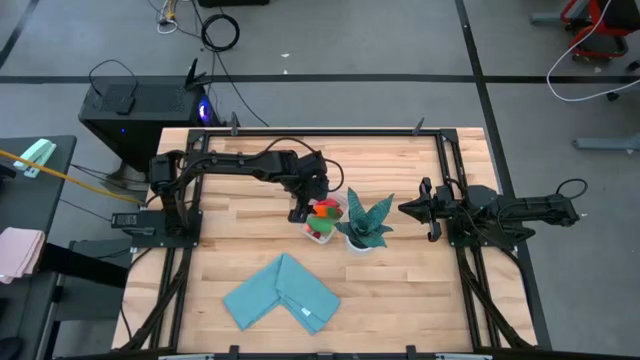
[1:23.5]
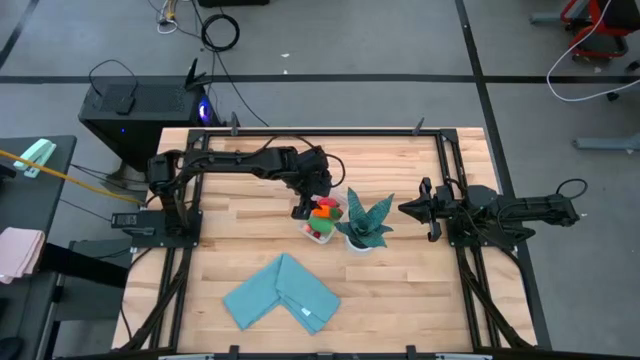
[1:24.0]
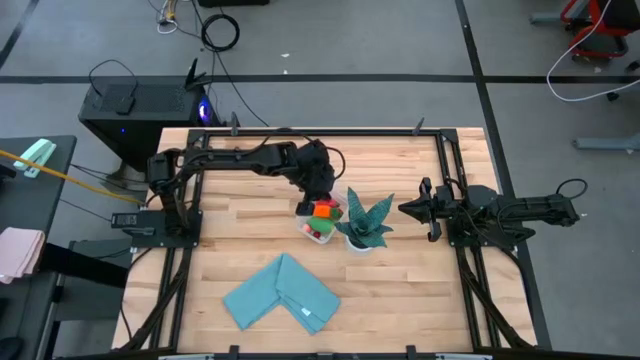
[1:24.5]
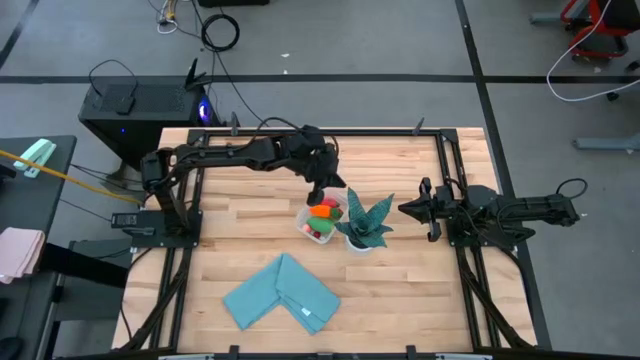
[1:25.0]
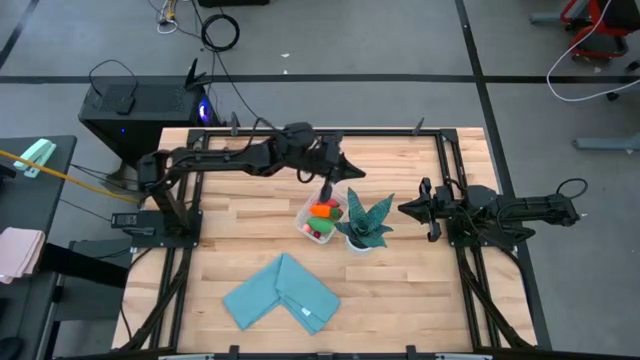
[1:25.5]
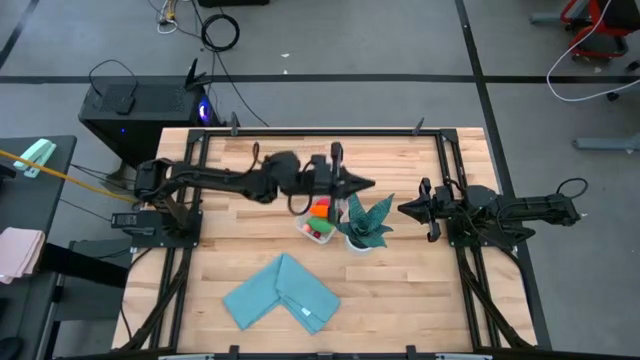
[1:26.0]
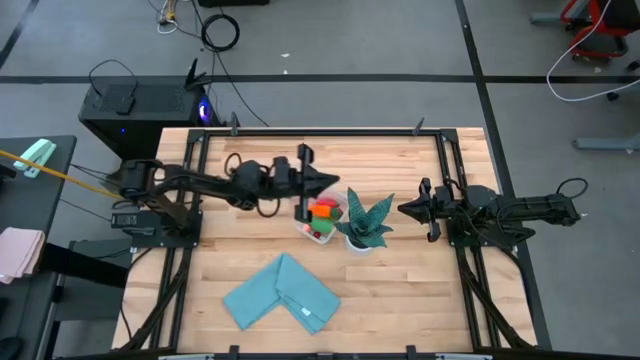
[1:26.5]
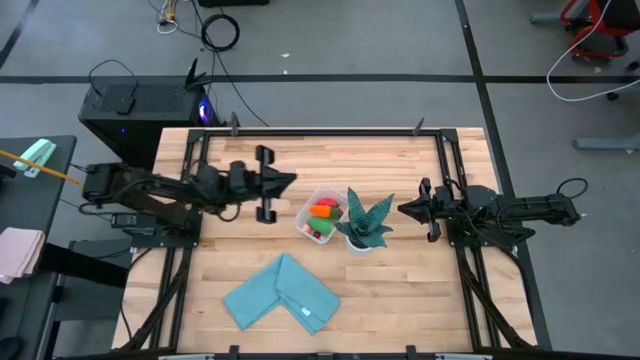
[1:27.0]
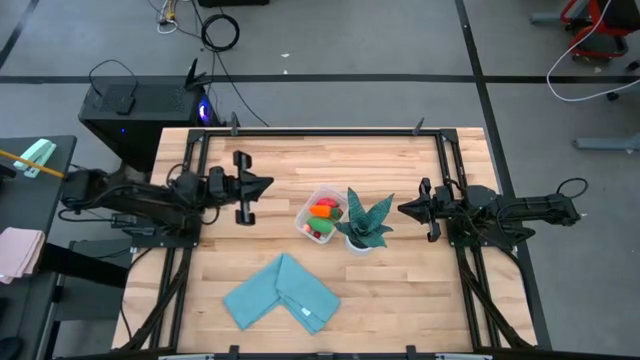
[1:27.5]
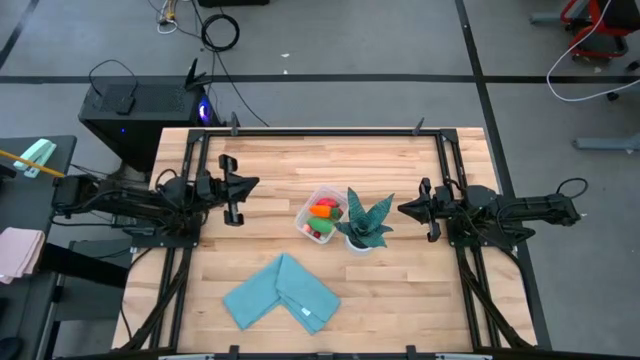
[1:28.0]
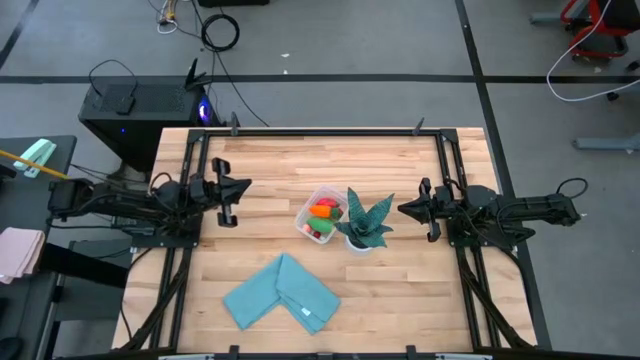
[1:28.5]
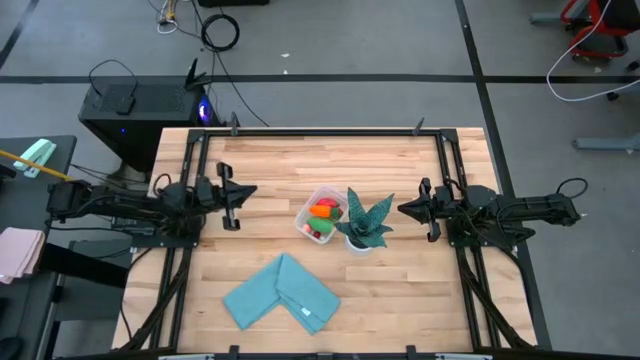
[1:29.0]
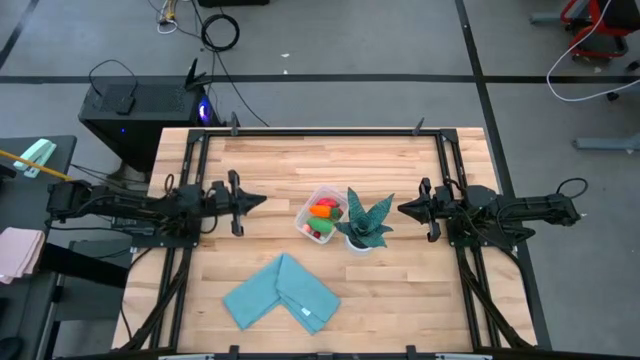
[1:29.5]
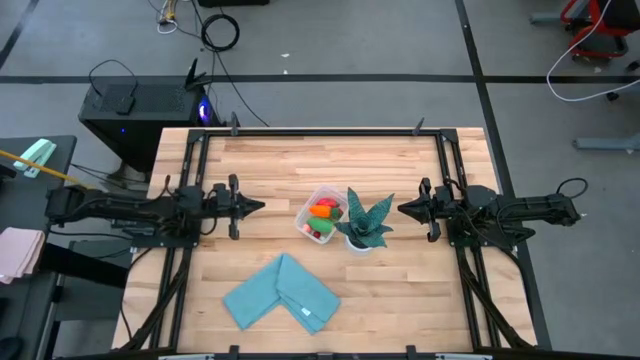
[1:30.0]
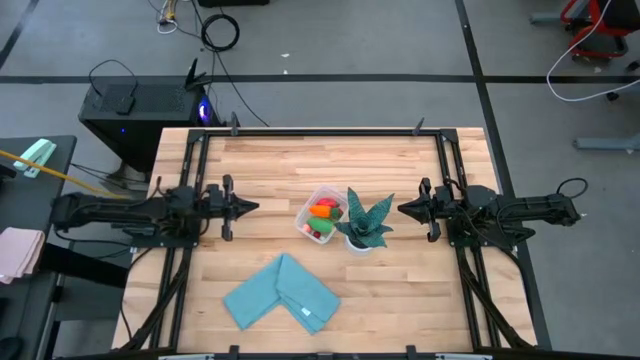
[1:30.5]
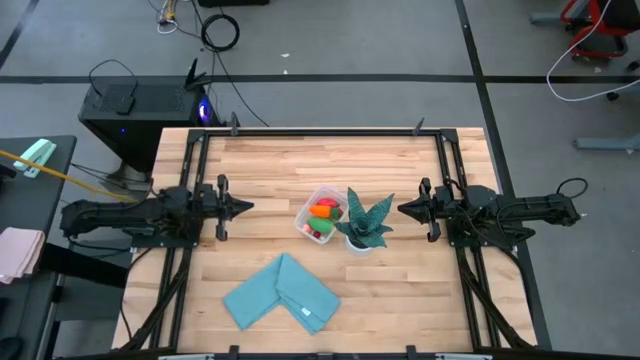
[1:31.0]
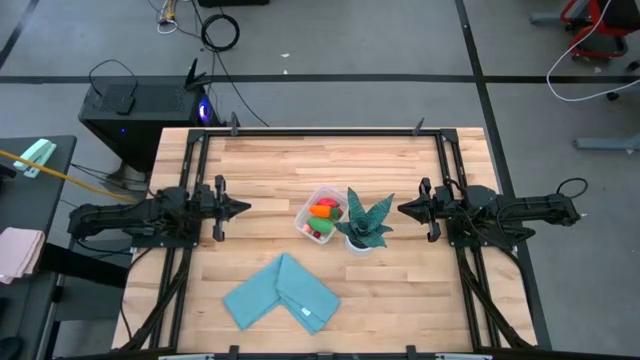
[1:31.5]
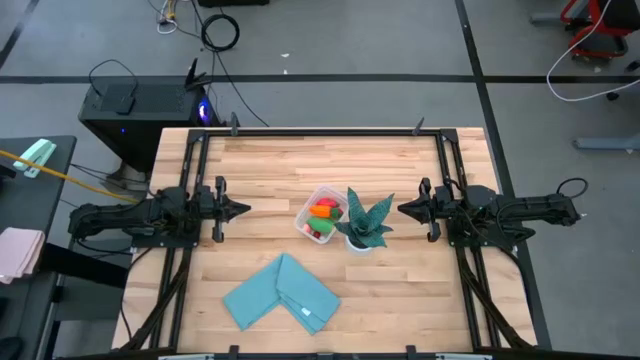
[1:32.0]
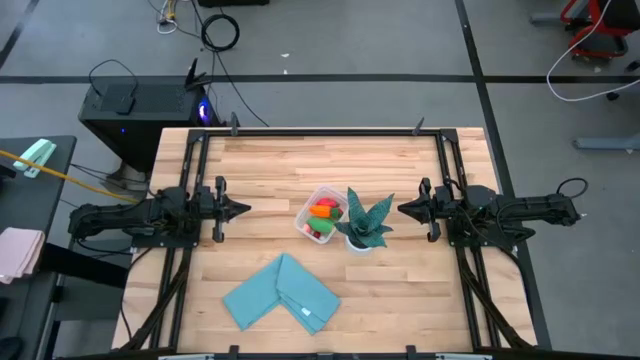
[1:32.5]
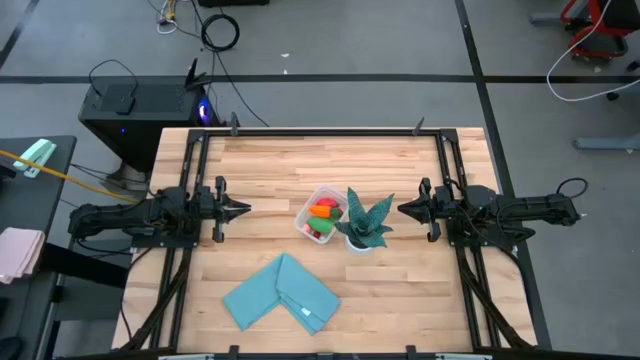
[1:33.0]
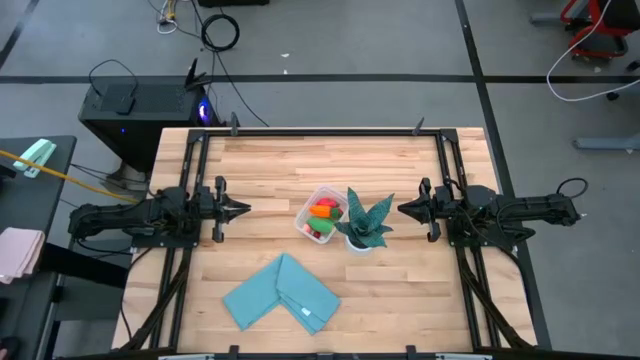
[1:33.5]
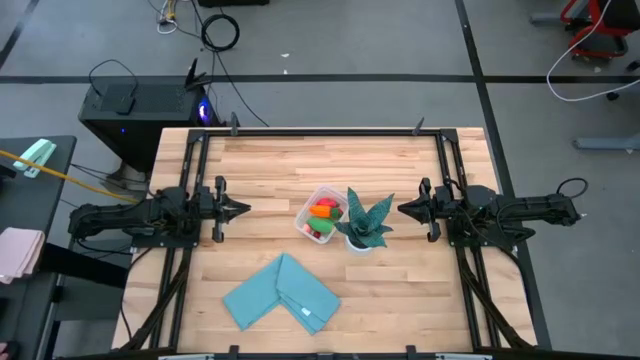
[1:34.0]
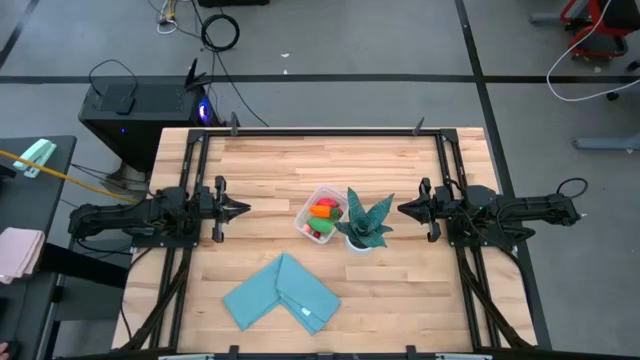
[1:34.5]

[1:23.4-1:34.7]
Task: Pick and placing Produce into tupperware
Return to Home Position

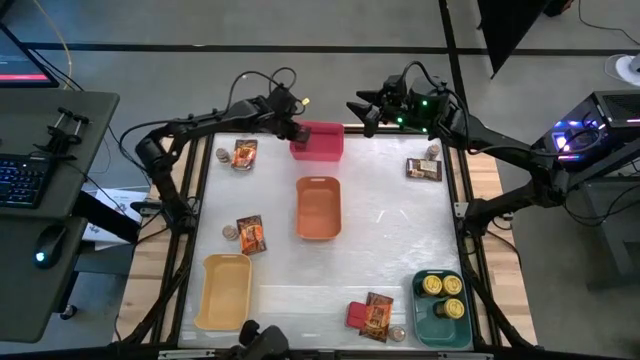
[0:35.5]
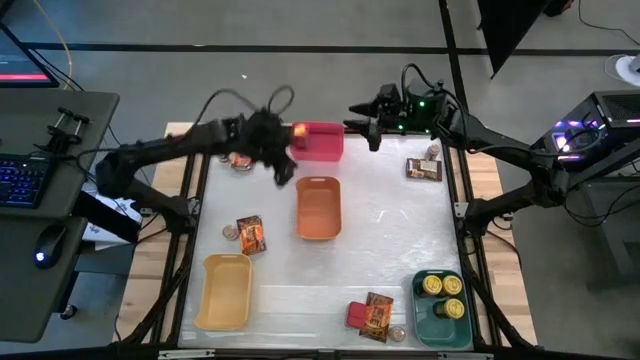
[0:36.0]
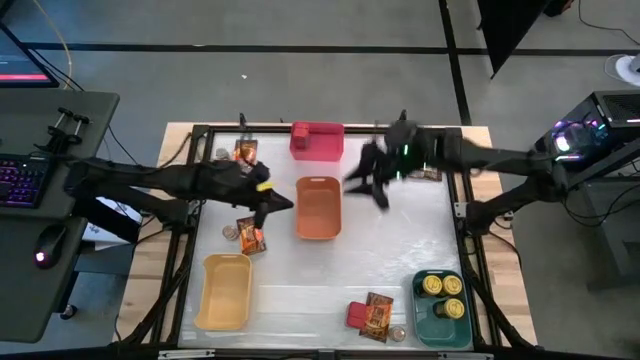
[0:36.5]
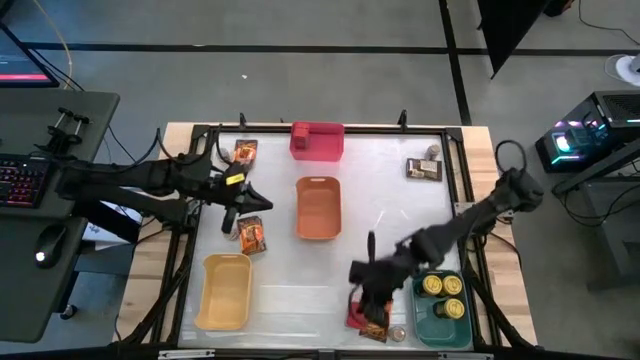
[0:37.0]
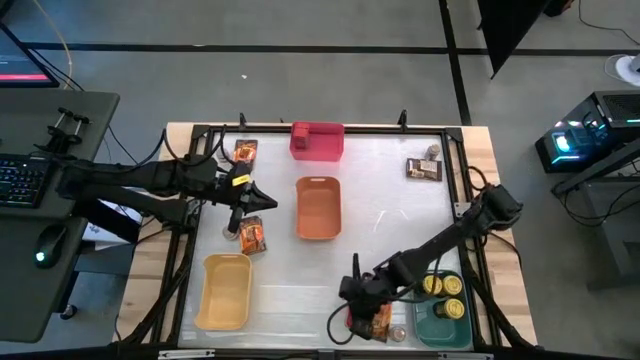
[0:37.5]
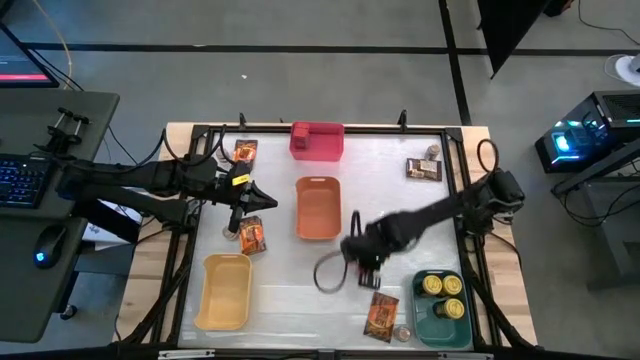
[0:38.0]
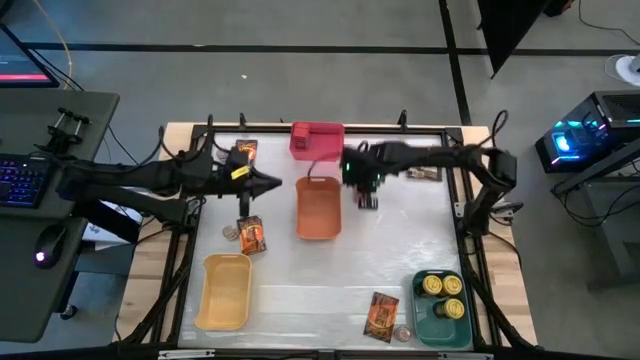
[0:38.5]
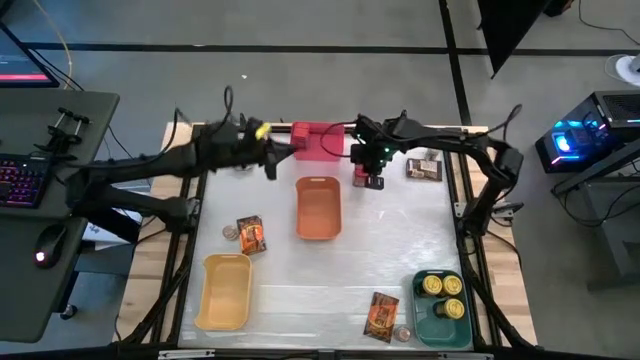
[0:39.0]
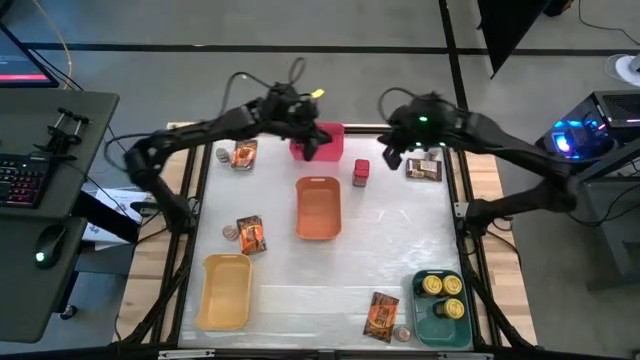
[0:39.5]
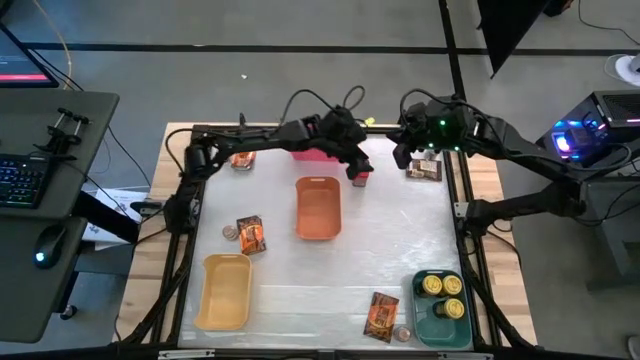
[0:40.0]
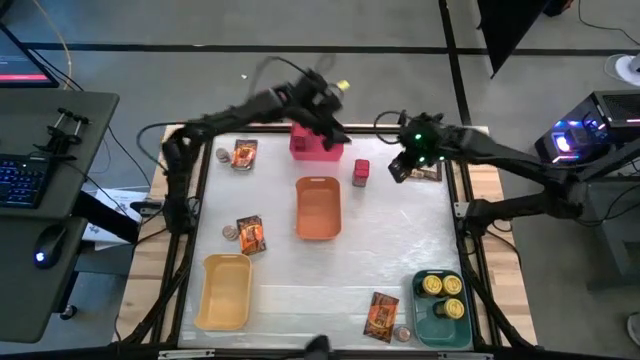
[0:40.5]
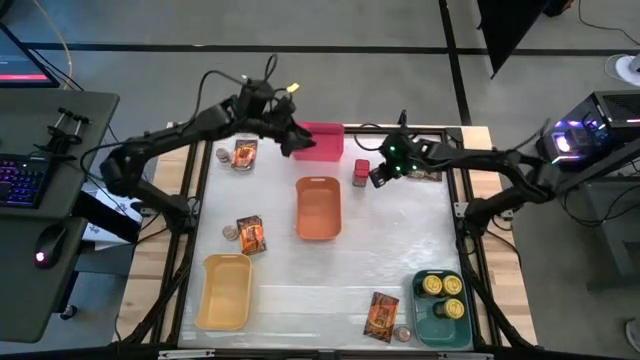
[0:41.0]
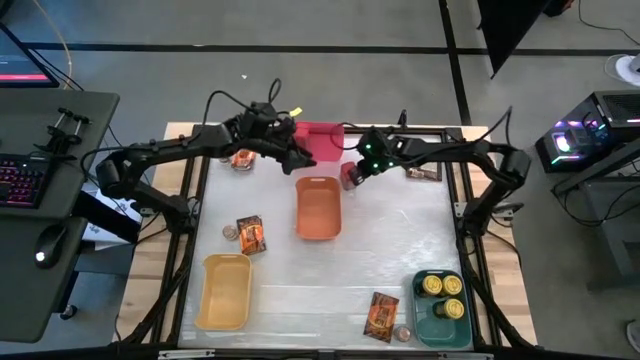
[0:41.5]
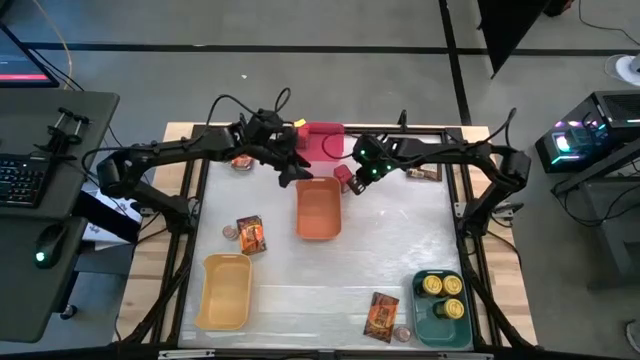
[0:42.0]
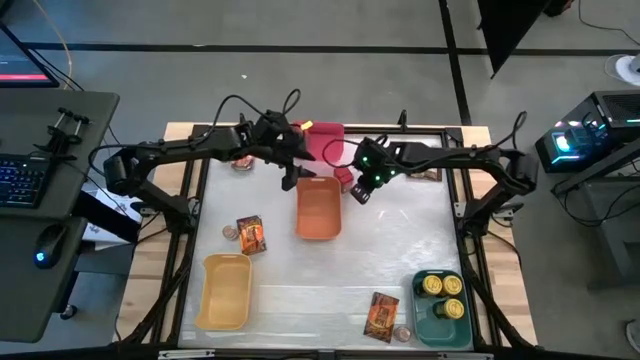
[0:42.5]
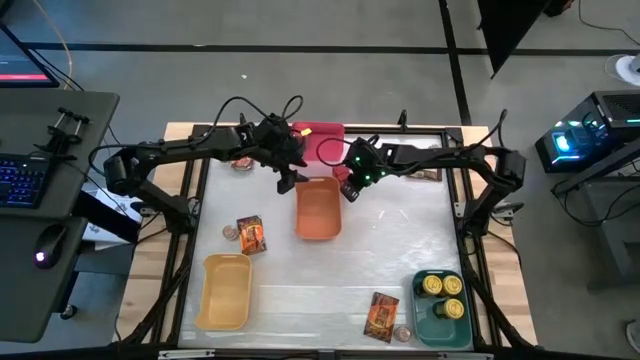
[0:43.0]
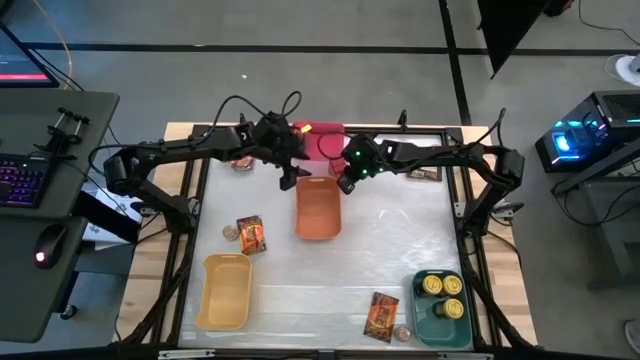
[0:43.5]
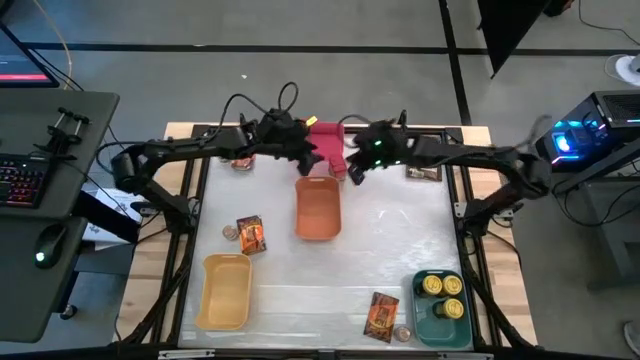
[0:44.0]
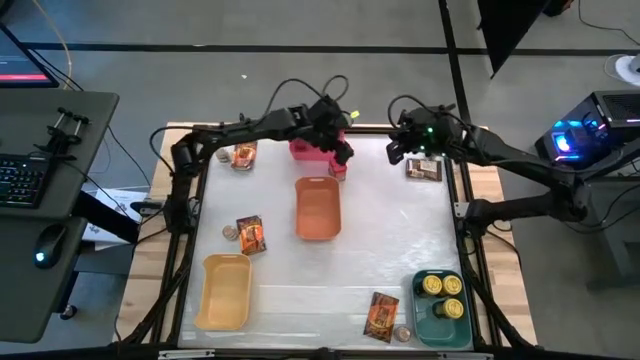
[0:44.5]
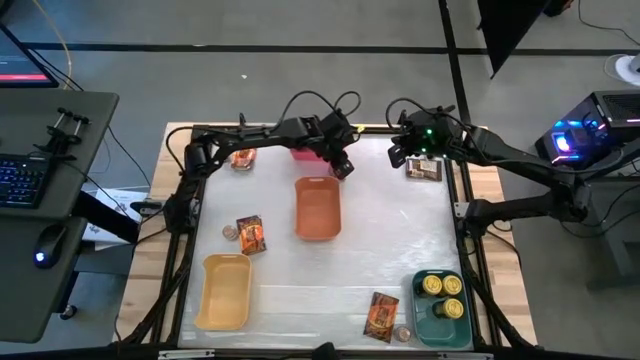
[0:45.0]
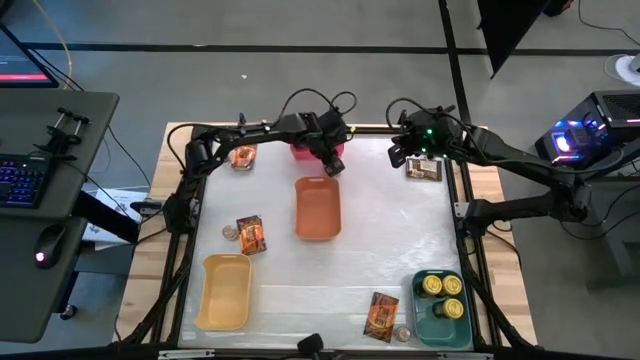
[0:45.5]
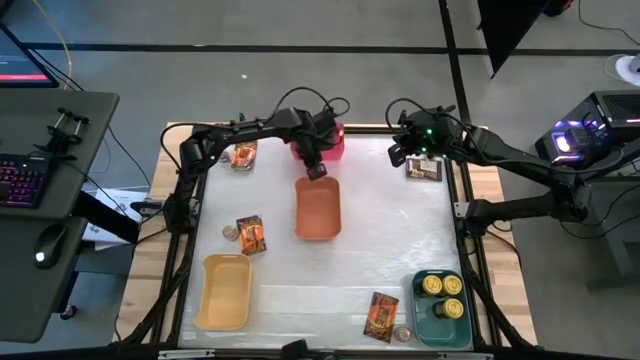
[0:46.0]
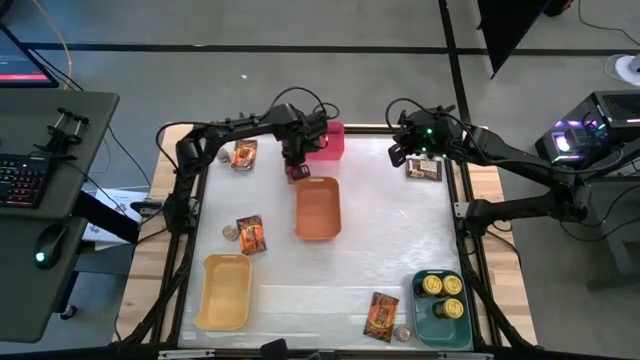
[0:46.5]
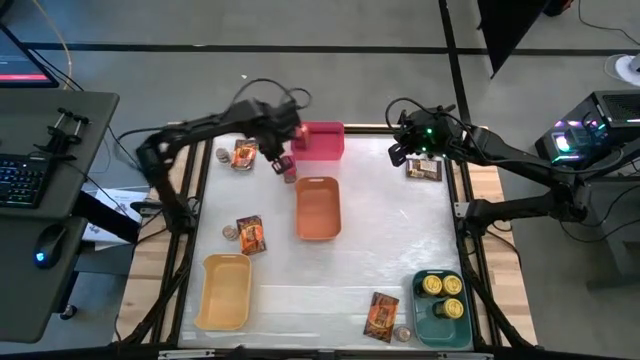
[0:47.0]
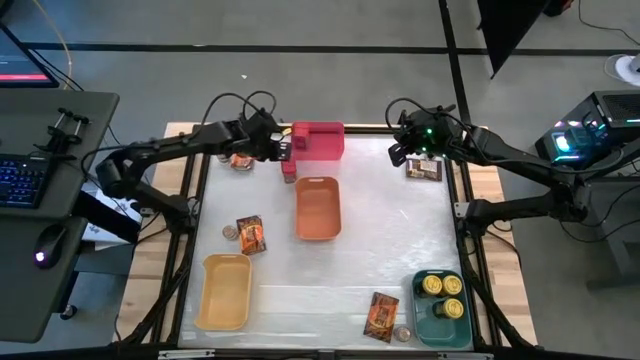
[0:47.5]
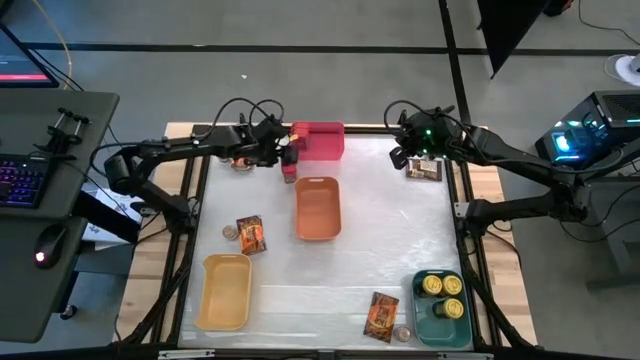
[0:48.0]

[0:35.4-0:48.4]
Task: Sort spices by type
Put the red spice can into the red bin
